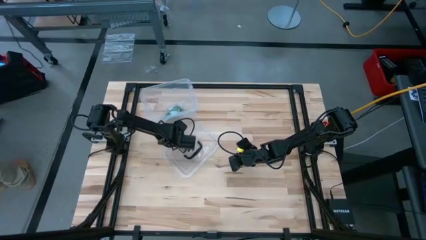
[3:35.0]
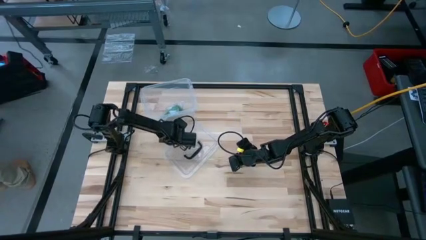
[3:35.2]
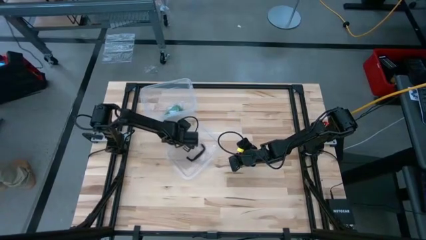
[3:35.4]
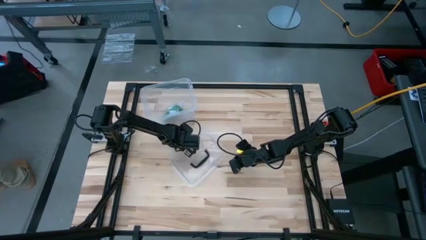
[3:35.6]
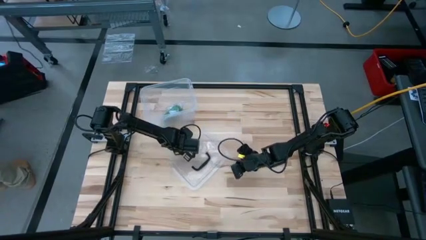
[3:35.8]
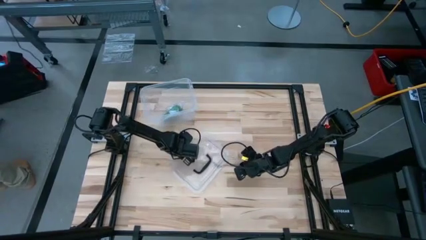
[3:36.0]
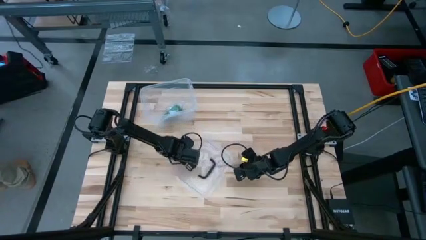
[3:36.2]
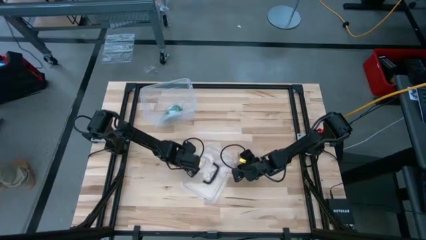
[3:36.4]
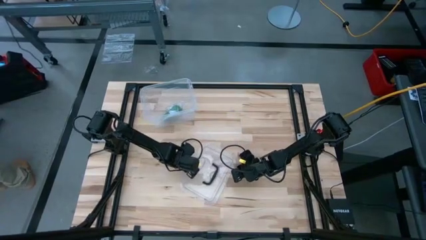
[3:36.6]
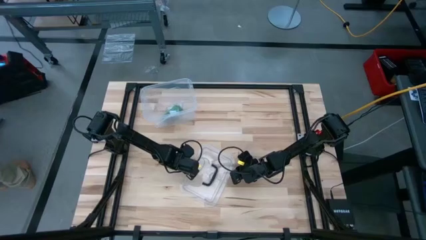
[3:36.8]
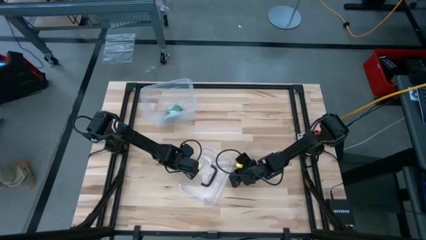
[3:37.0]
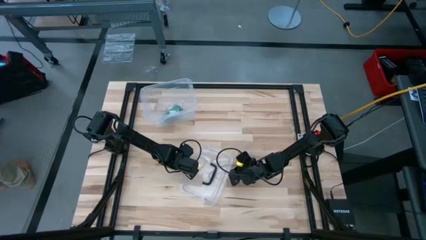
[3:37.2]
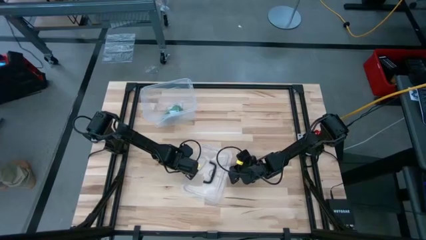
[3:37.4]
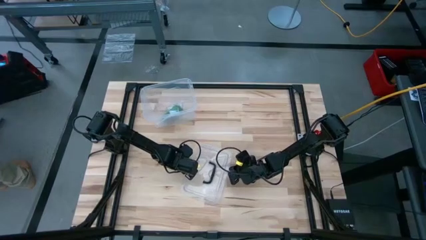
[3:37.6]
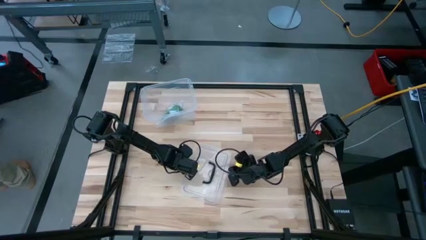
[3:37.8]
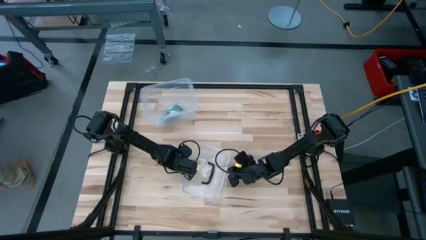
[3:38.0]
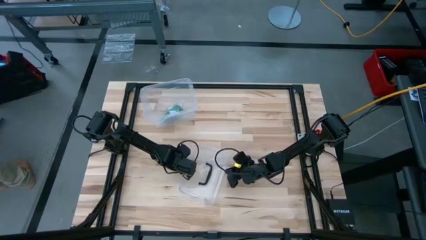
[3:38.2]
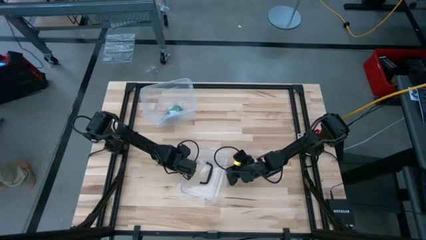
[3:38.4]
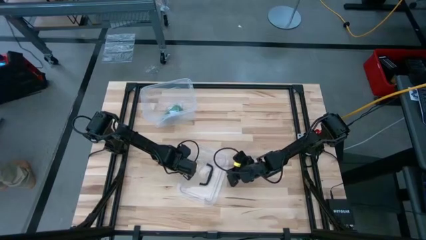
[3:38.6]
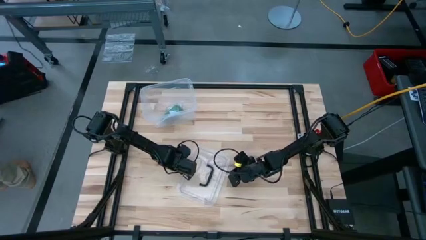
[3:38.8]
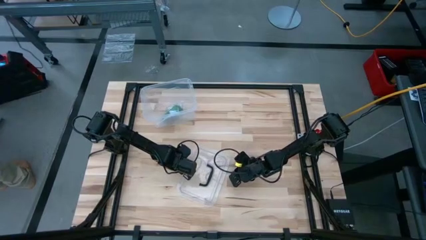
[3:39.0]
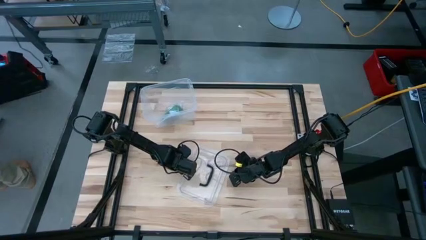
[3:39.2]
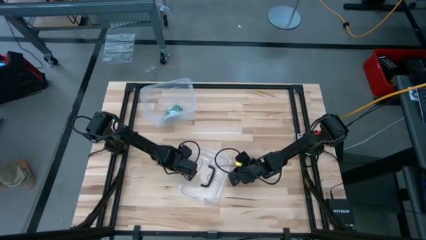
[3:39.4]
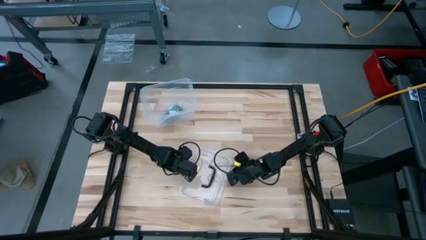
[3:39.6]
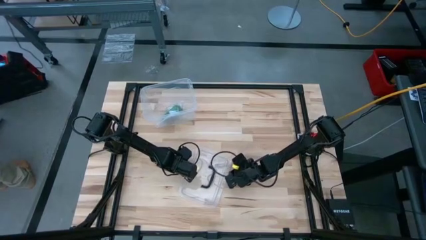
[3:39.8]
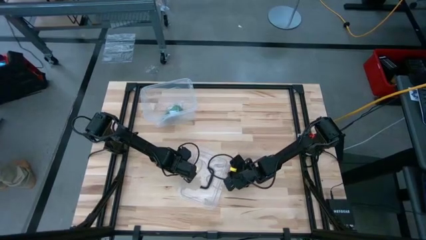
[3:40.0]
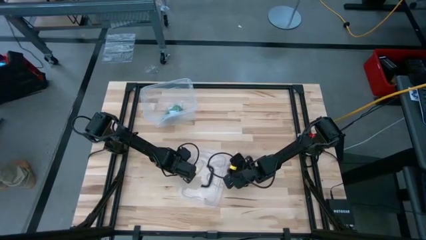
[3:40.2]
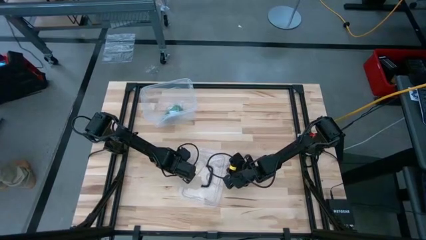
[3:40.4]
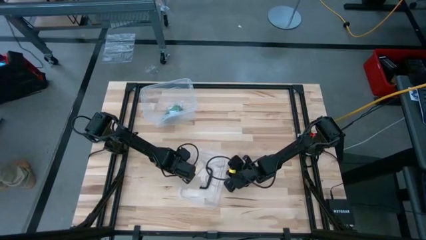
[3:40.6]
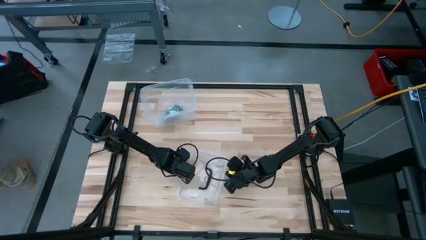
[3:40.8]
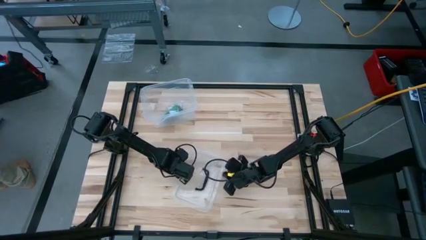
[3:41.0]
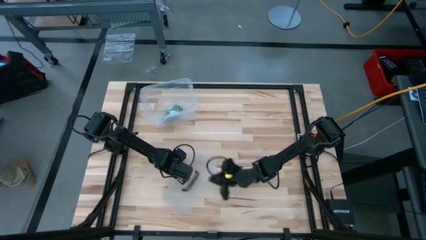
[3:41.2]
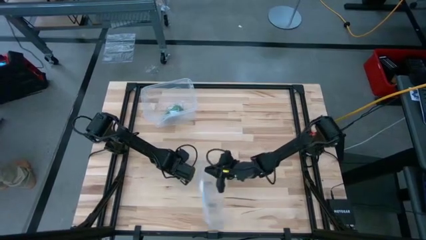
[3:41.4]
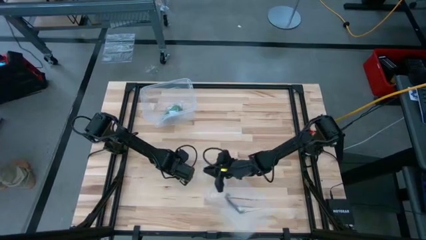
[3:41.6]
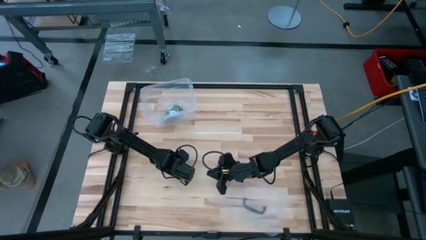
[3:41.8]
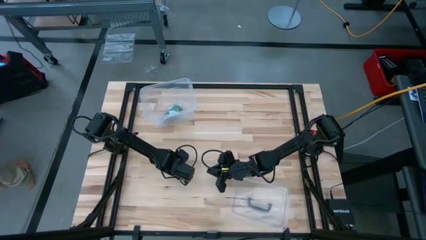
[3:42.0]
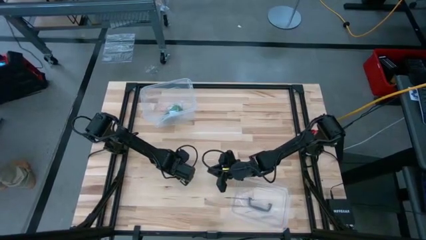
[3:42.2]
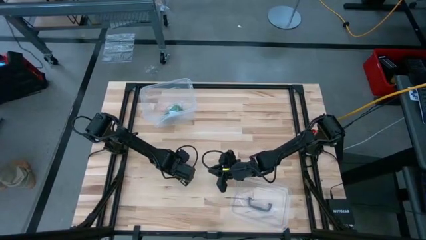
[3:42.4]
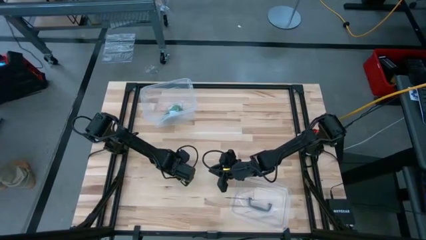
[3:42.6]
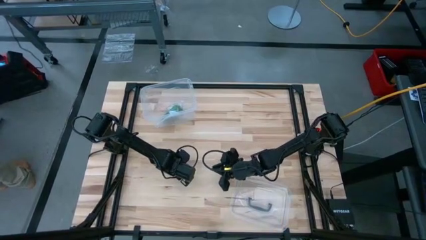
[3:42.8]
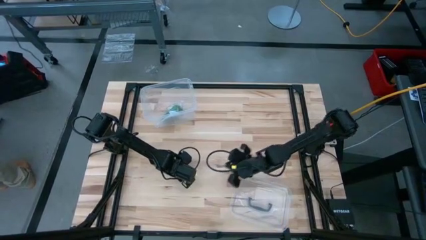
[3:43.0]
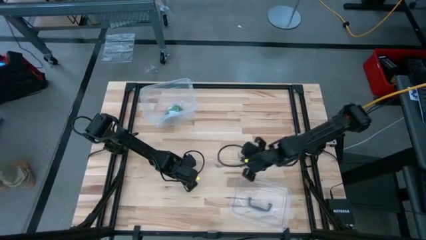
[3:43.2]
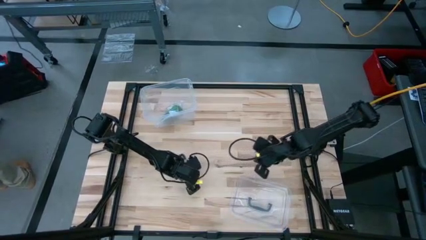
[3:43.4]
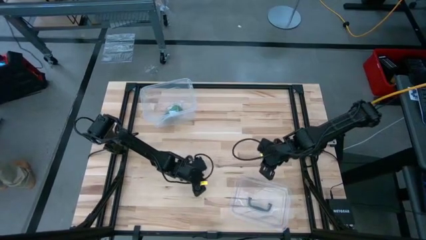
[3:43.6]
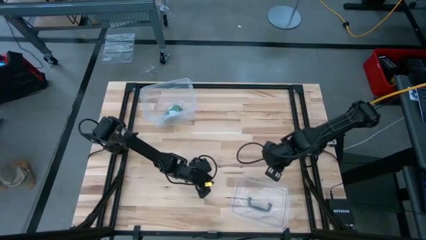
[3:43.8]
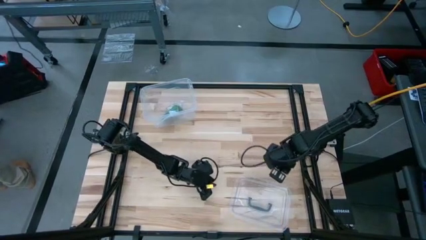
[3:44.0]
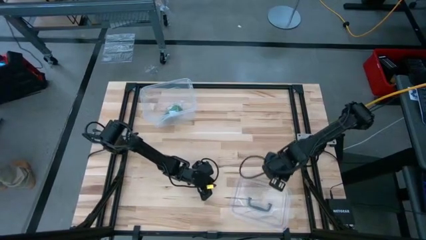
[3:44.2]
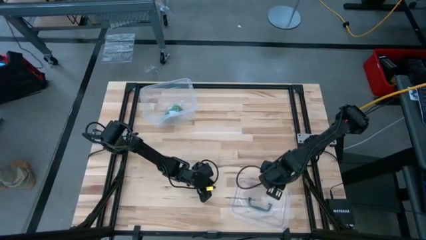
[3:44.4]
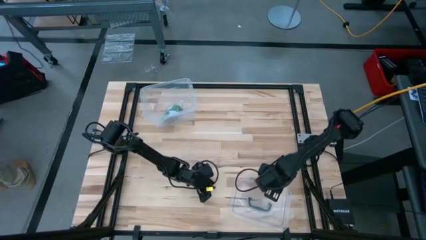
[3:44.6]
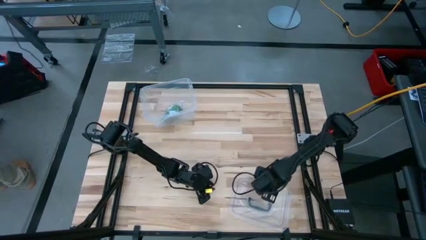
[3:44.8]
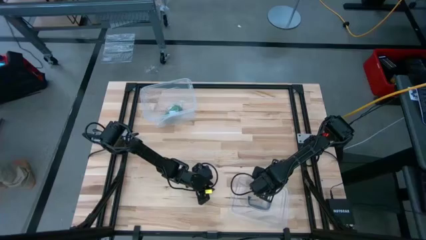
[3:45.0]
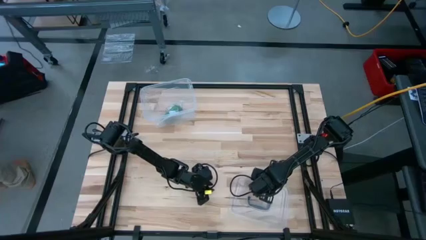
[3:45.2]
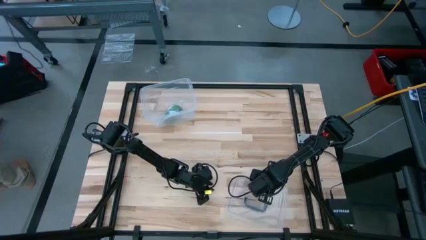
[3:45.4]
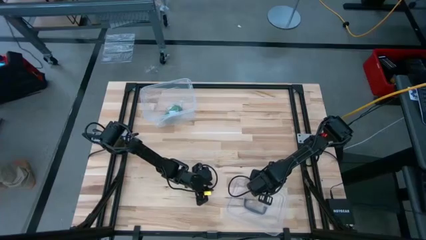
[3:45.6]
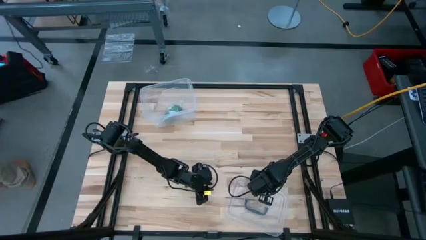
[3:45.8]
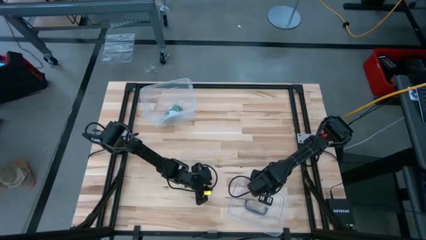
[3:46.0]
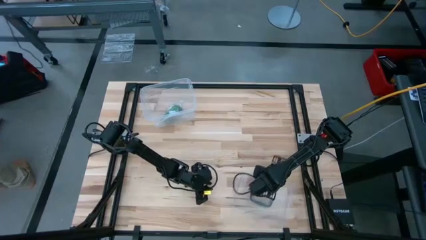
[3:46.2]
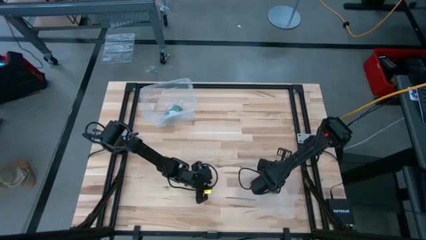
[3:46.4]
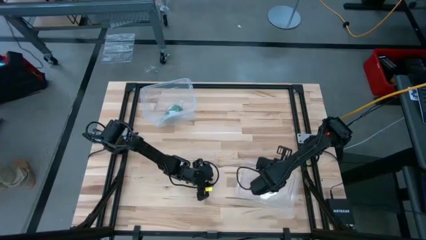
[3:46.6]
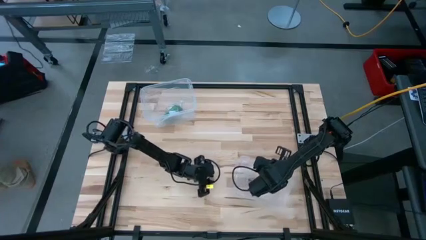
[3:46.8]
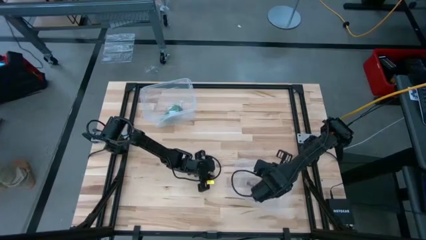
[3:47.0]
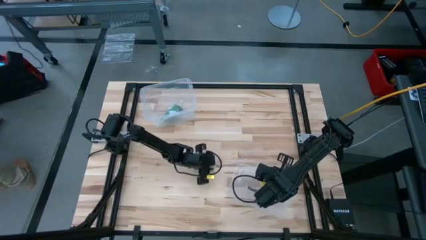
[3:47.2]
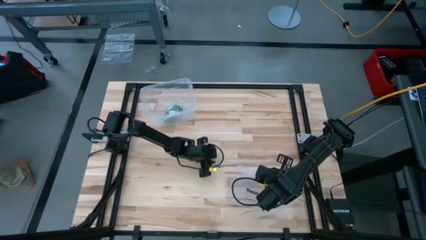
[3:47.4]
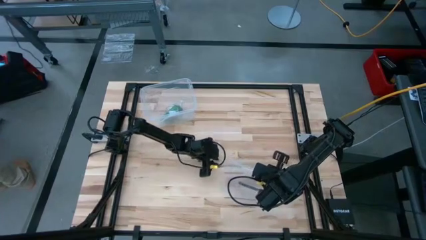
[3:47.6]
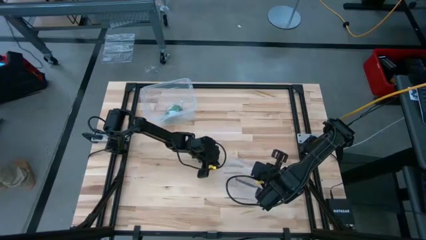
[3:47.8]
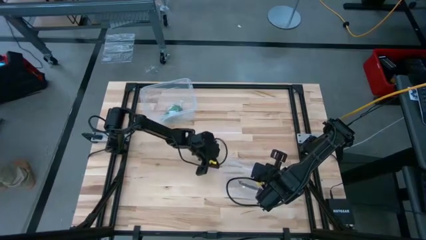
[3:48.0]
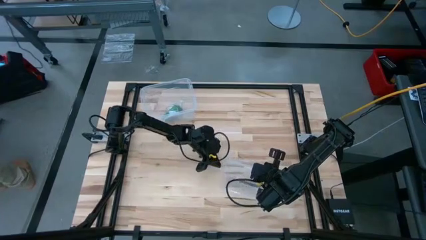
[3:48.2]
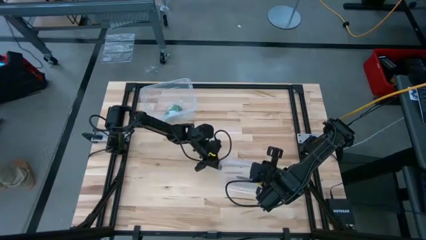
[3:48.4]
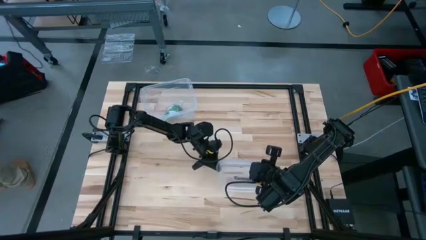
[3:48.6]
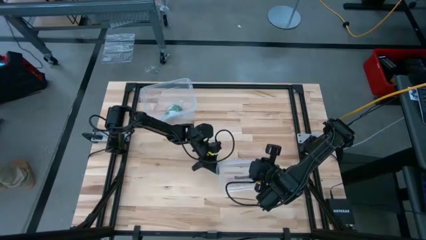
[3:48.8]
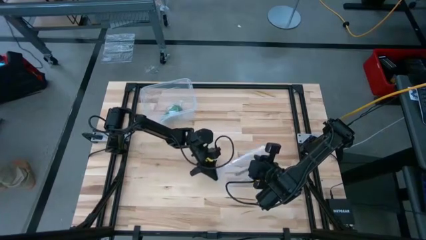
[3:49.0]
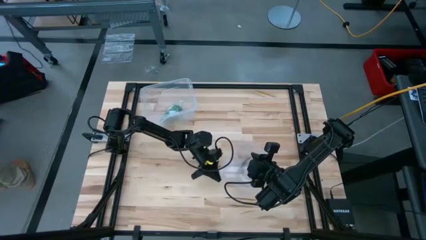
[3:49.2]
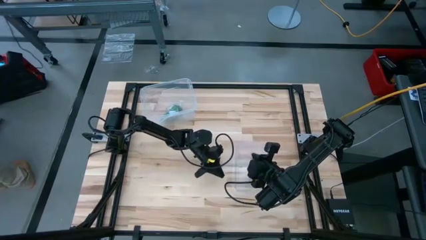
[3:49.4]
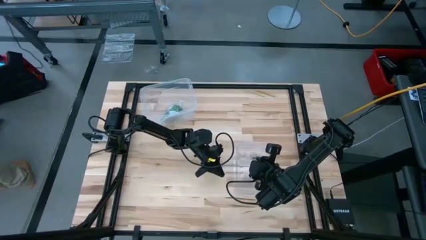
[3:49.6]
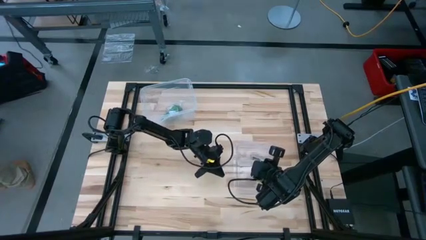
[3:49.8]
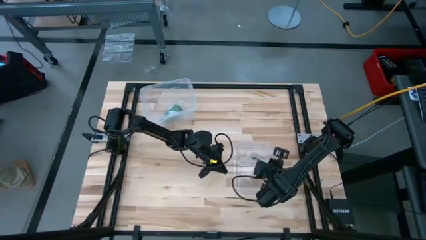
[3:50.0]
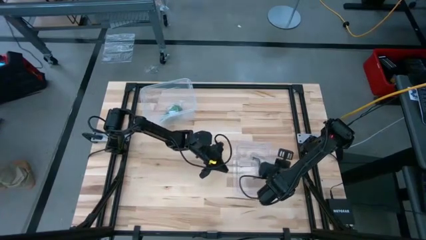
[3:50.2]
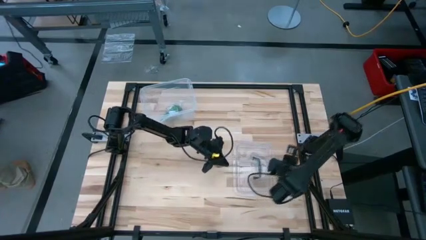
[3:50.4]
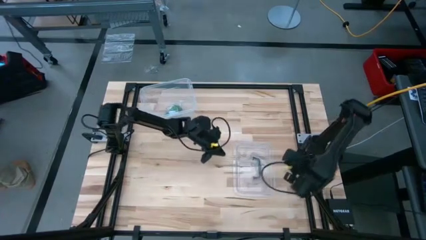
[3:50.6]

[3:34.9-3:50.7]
Task: Roll bandage
Close the transparent bin with the transparent bin cover
